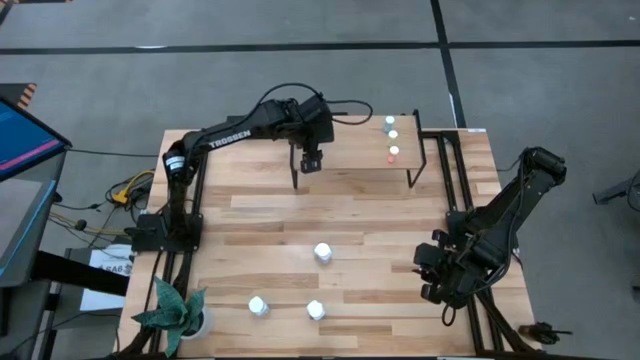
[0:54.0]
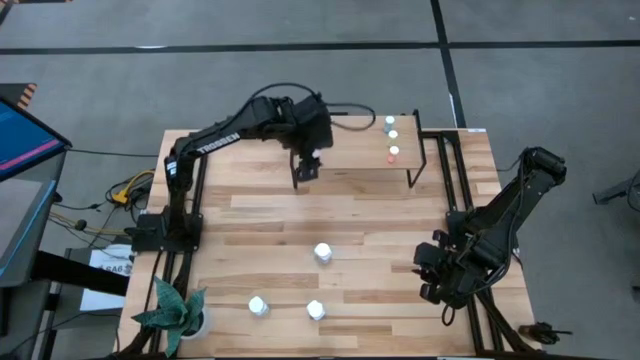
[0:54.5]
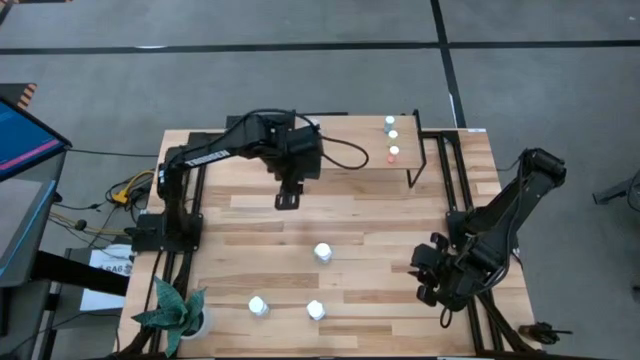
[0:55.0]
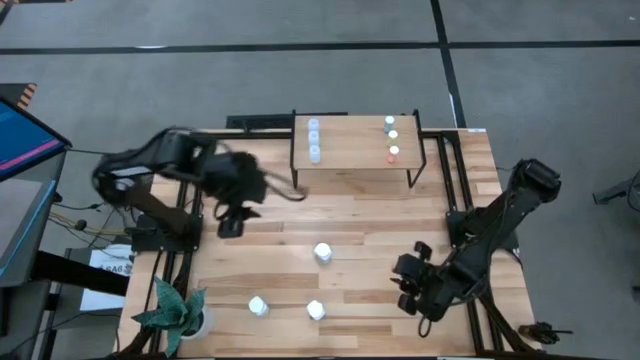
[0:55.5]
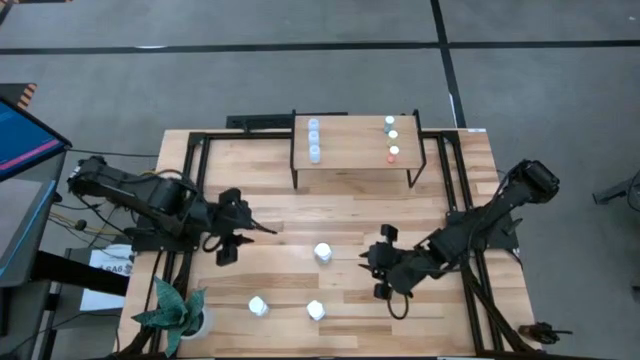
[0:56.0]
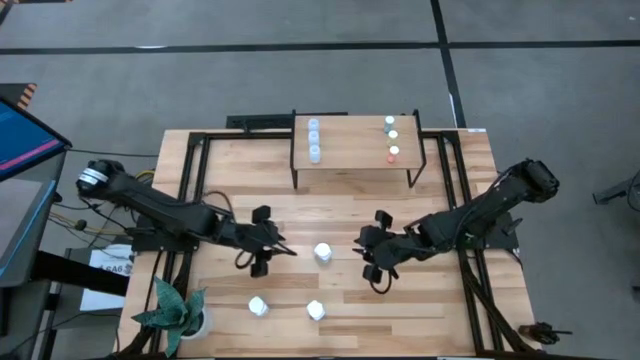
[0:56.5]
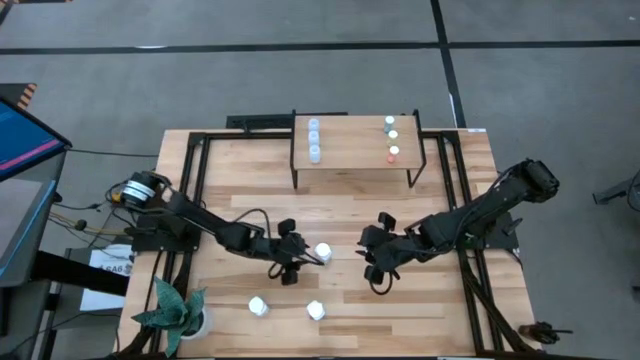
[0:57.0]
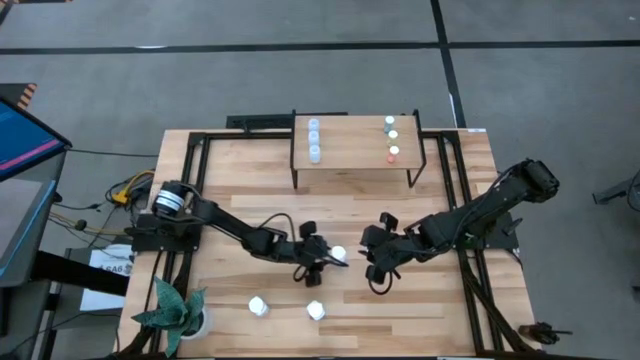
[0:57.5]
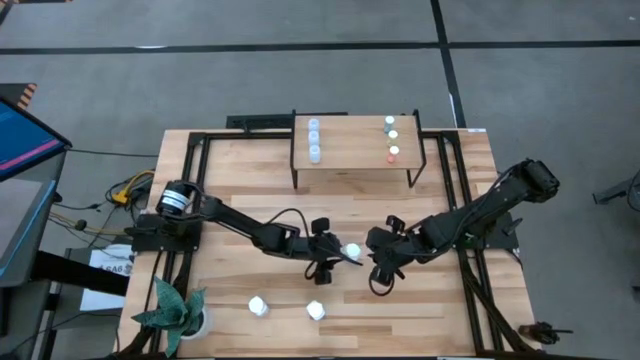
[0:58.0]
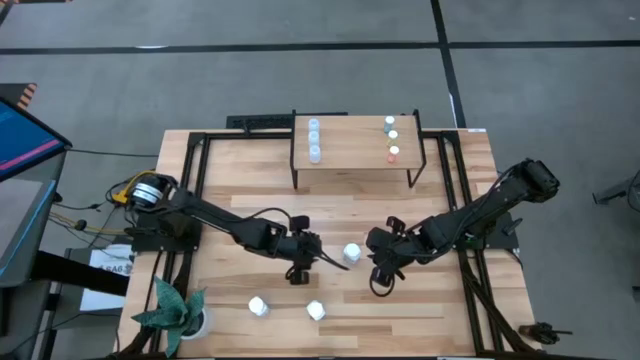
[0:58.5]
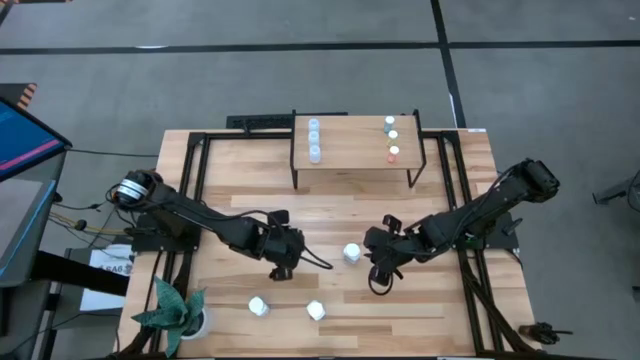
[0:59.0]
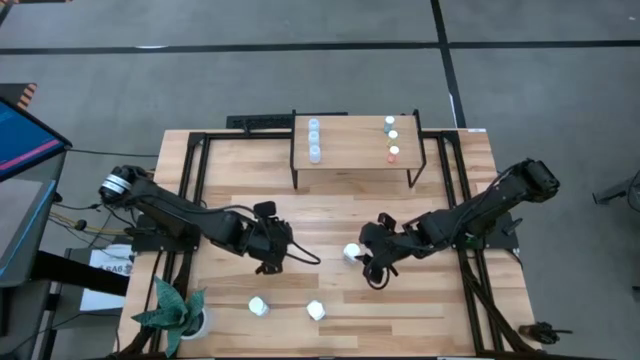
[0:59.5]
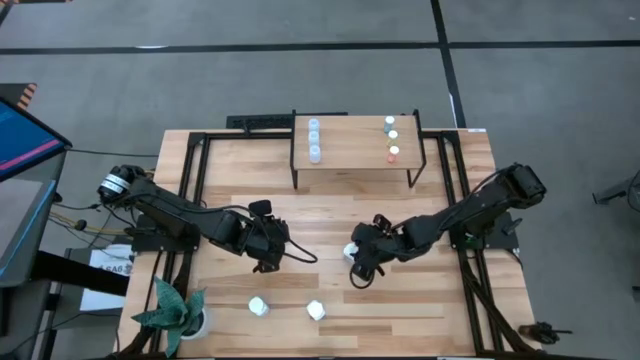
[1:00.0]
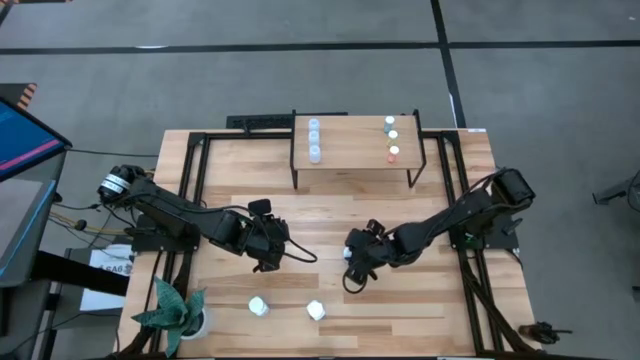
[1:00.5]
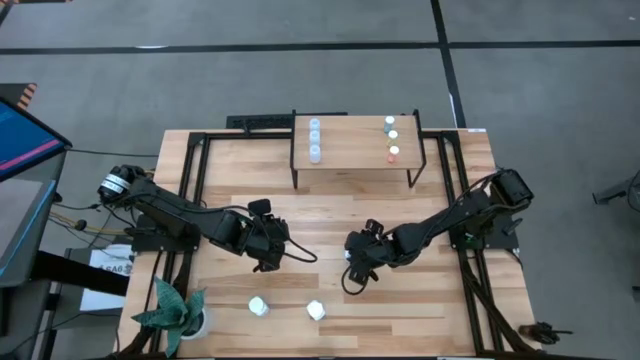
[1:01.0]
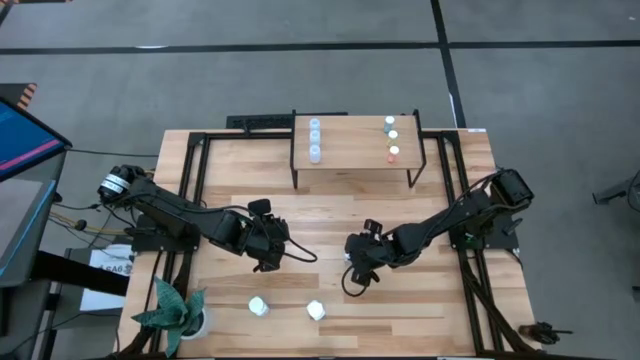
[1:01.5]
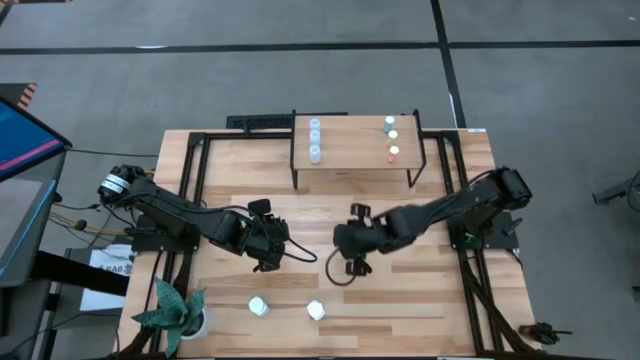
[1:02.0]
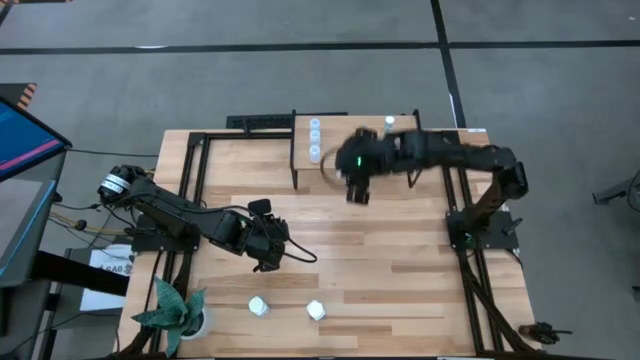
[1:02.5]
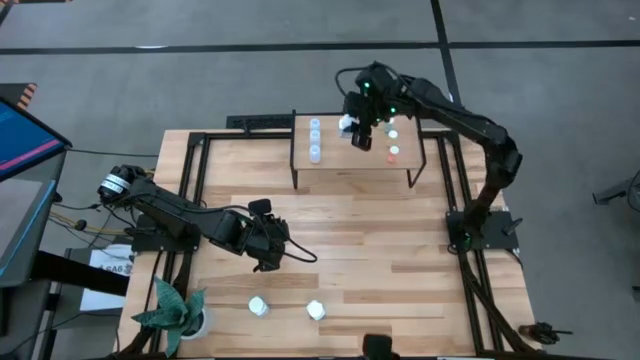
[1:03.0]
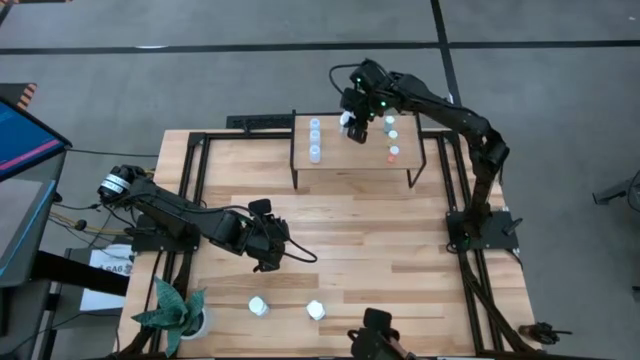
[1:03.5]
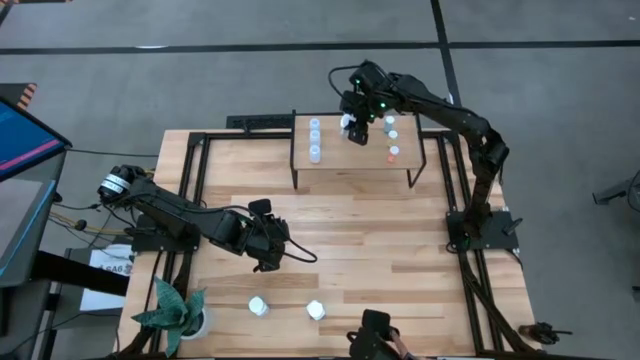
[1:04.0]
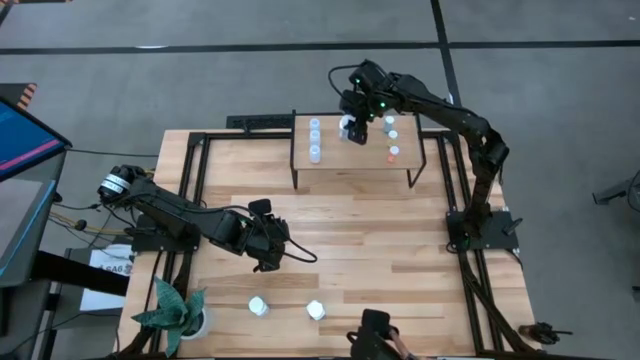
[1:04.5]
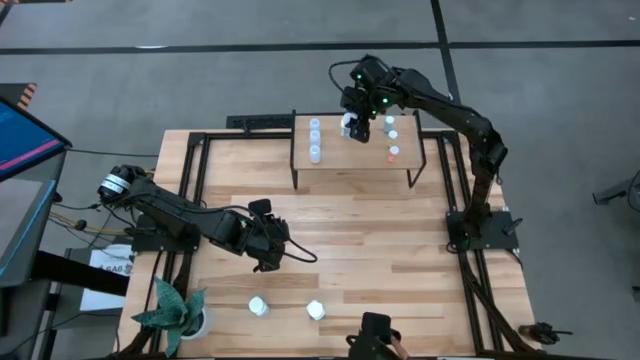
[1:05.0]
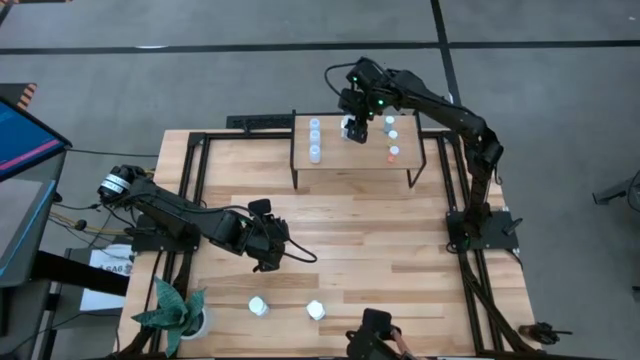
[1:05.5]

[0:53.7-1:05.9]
Task: Pick and place medicine bottles onto shelf by color
Put the top white big pill bottle on the shelf

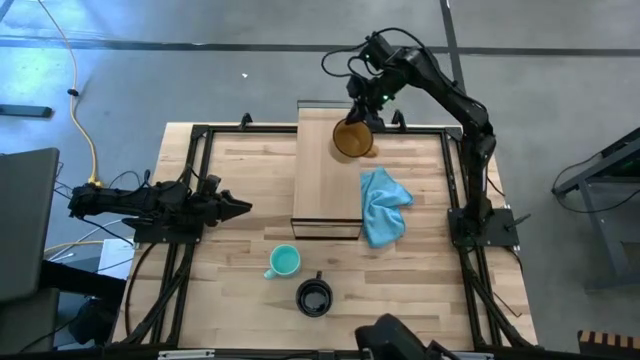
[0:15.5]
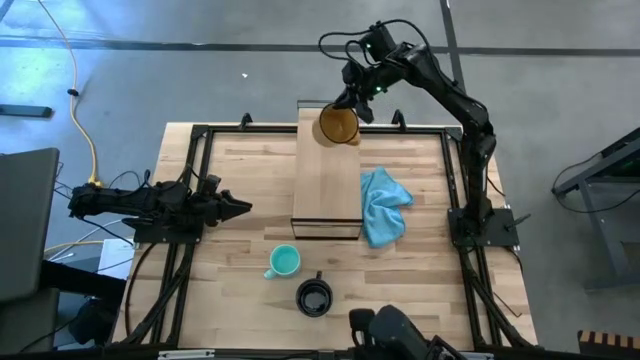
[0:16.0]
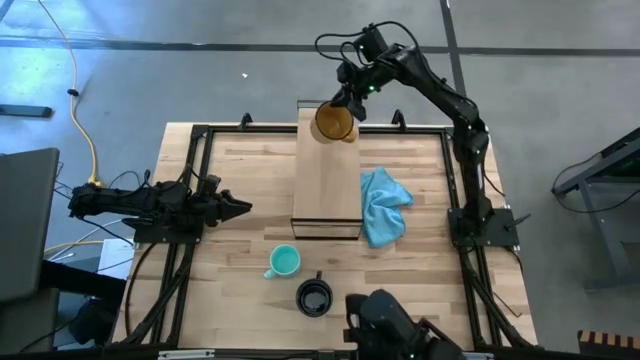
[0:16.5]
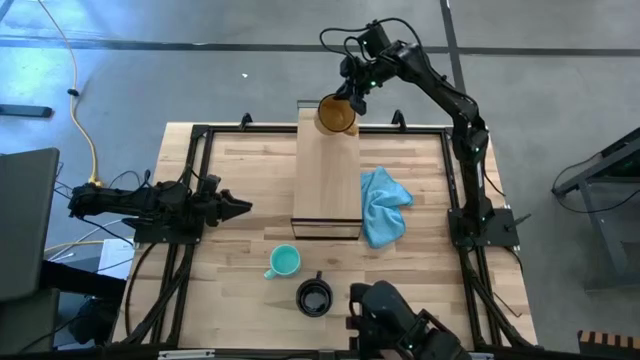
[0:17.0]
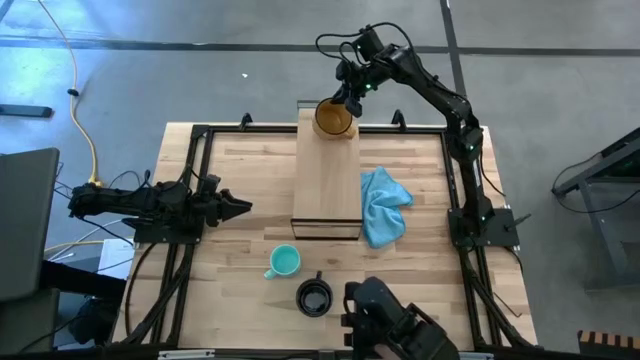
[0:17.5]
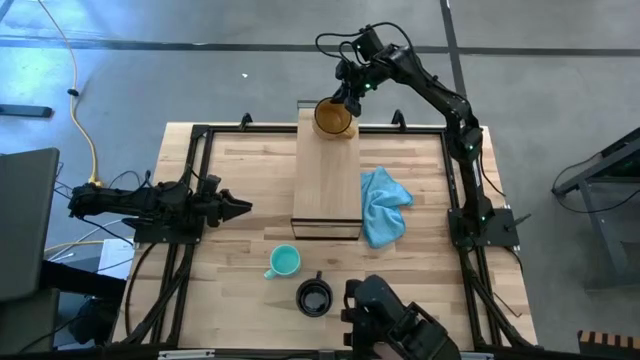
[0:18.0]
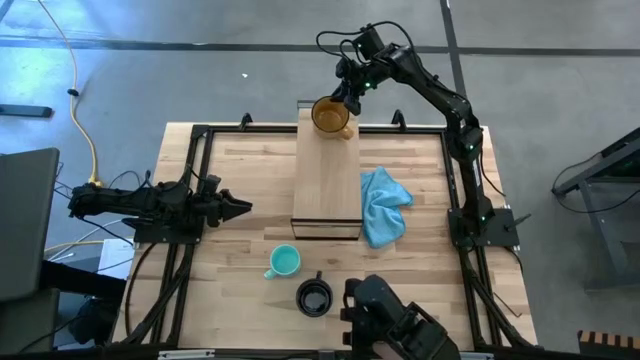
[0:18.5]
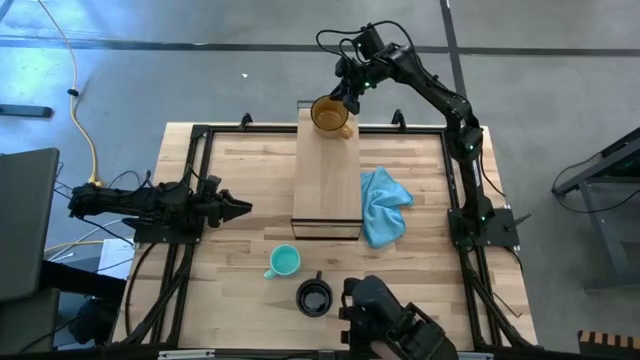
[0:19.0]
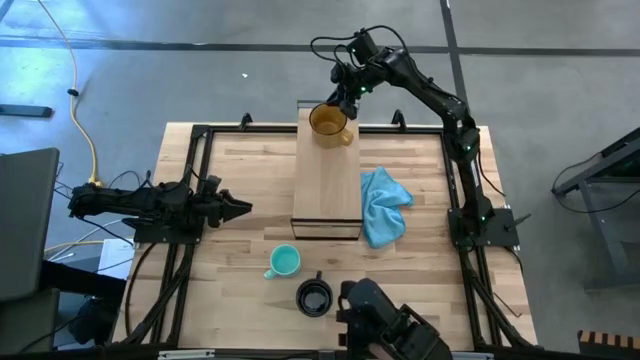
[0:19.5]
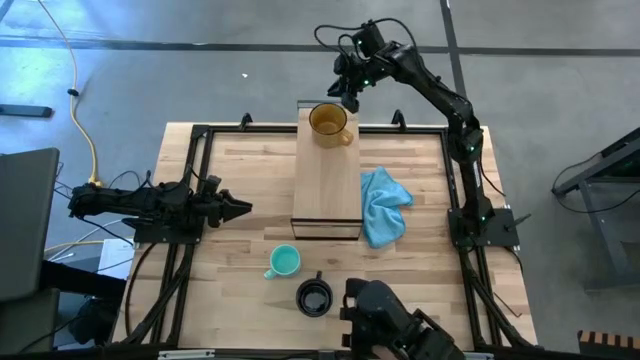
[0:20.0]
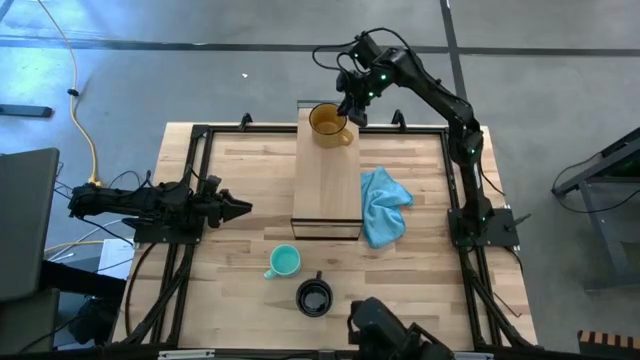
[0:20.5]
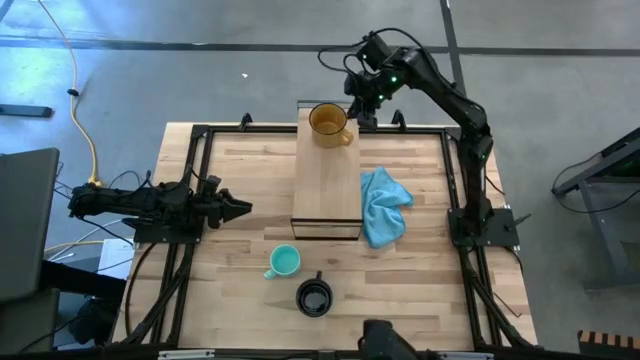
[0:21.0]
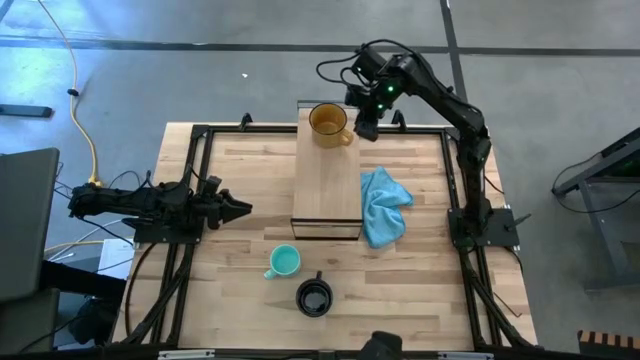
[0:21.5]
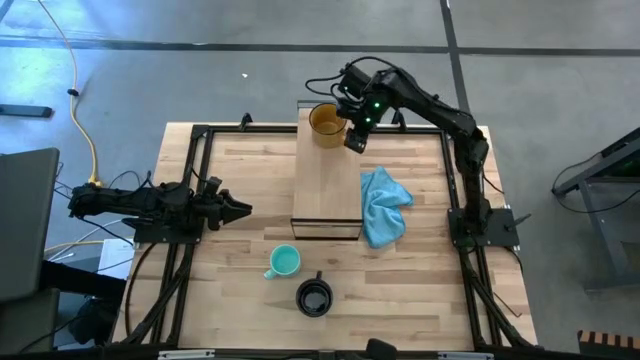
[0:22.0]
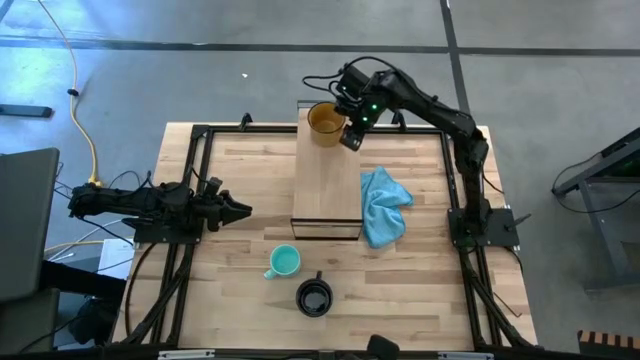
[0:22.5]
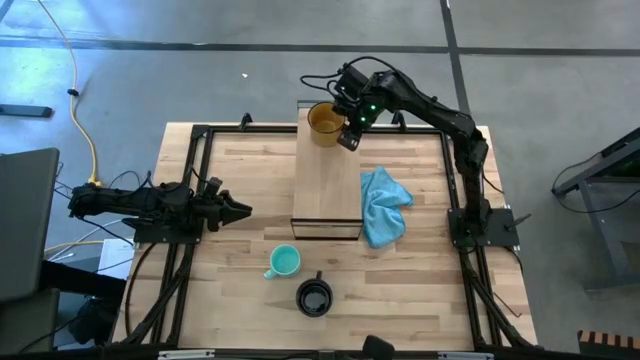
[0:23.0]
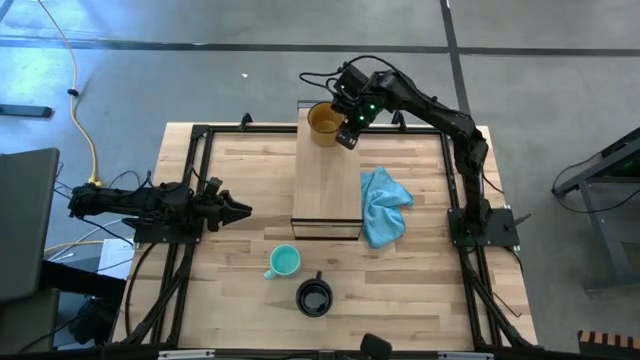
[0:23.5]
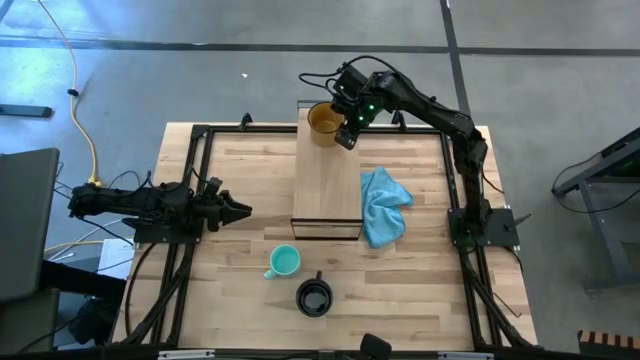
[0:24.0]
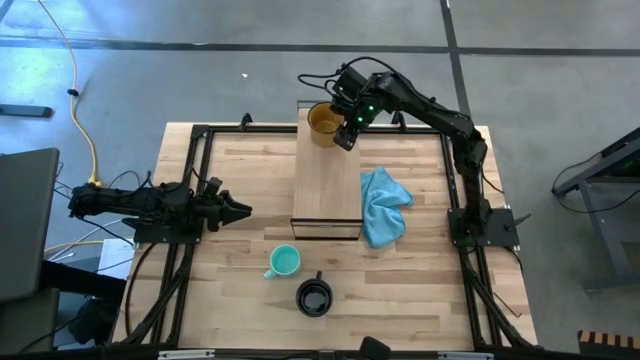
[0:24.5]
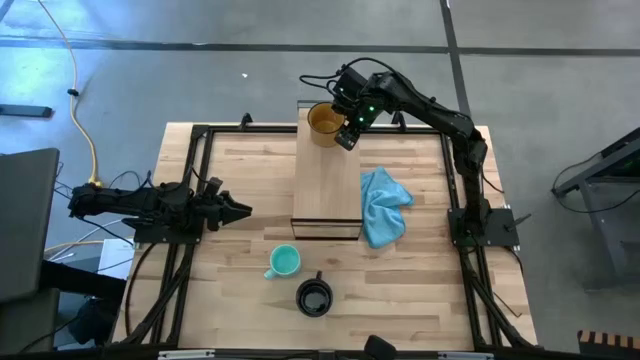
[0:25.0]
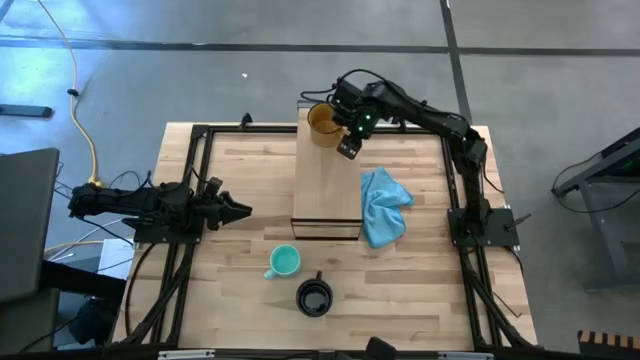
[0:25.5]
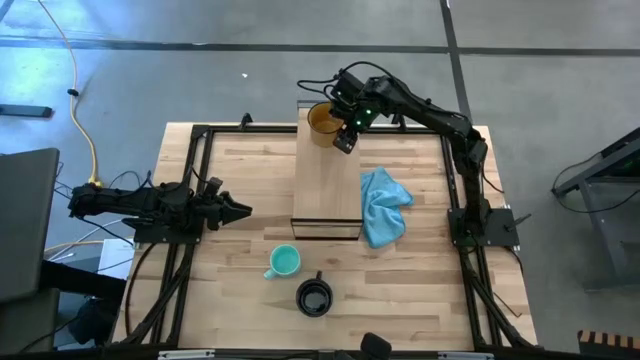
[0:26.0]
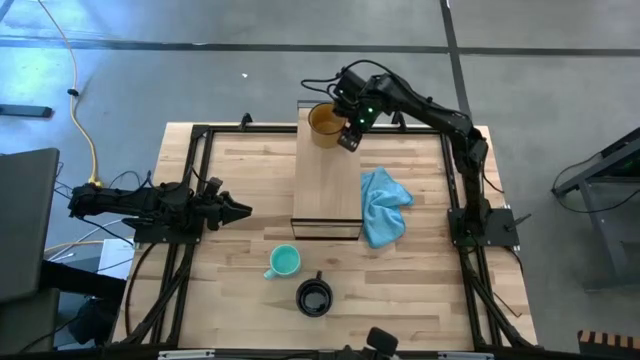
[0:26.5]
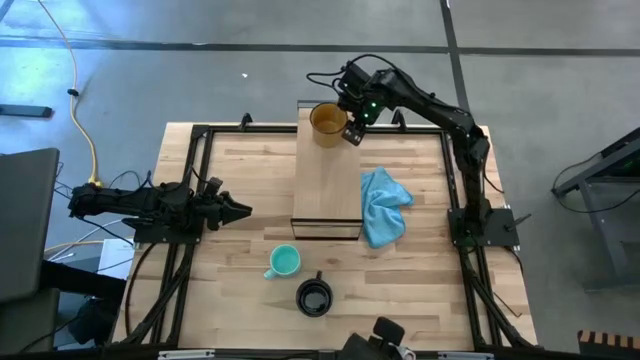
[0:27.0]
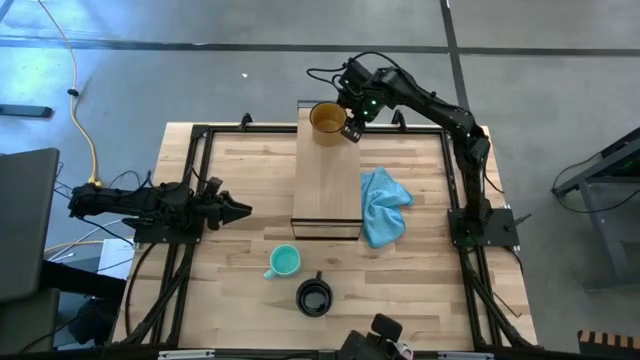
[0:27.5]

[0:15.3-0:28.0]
Task: Stack small to large cups/mugs on shelf
Put the yellow mug on the shelf
